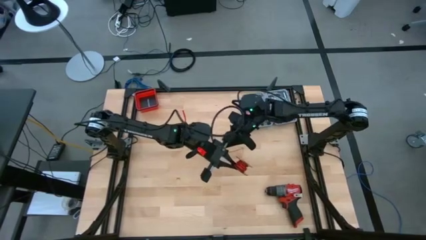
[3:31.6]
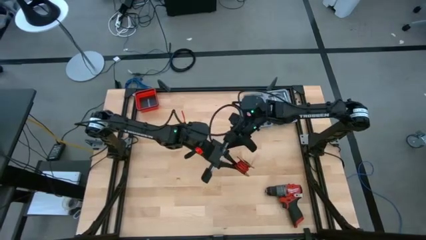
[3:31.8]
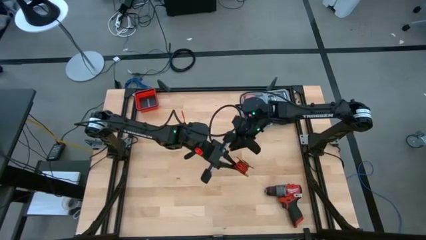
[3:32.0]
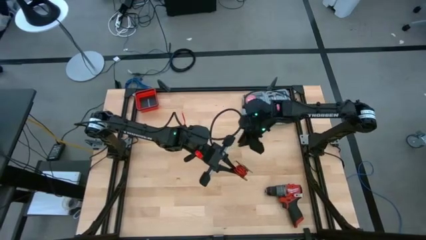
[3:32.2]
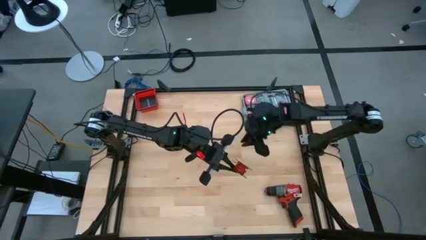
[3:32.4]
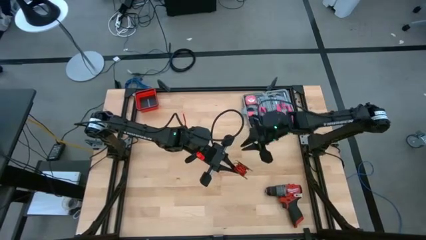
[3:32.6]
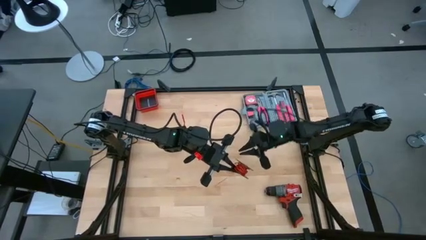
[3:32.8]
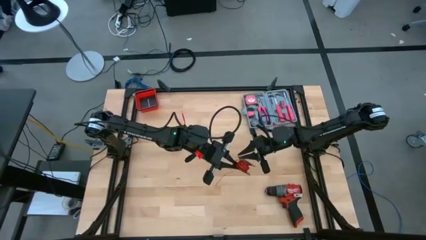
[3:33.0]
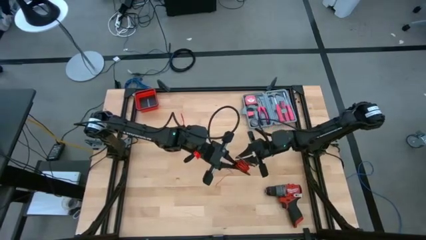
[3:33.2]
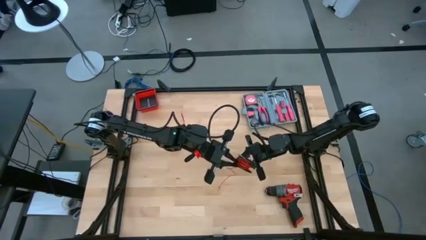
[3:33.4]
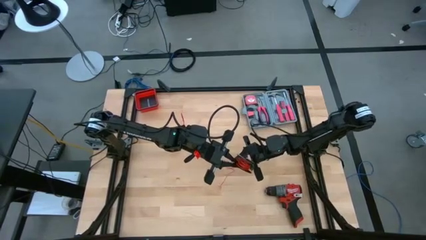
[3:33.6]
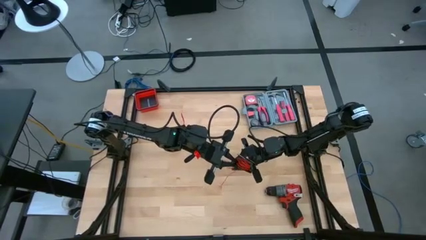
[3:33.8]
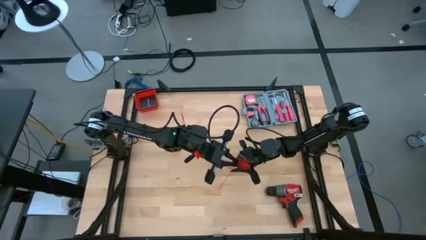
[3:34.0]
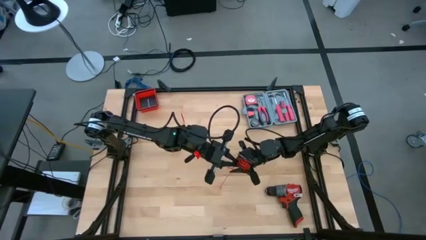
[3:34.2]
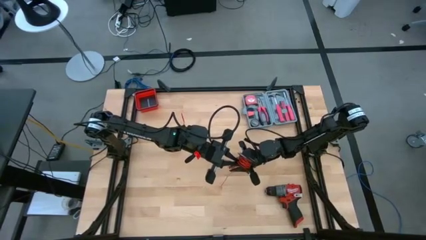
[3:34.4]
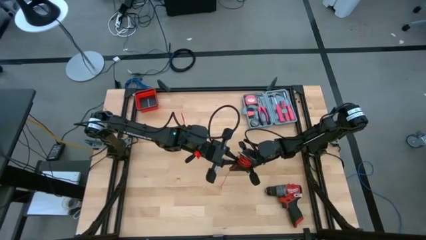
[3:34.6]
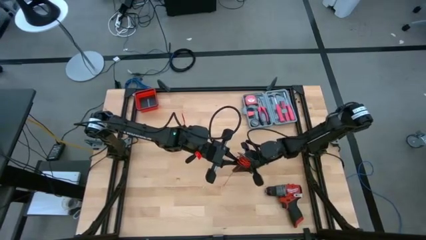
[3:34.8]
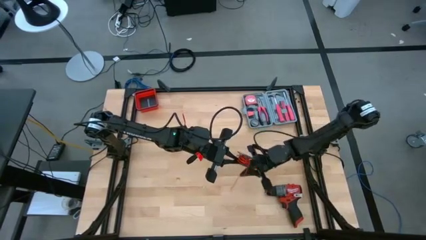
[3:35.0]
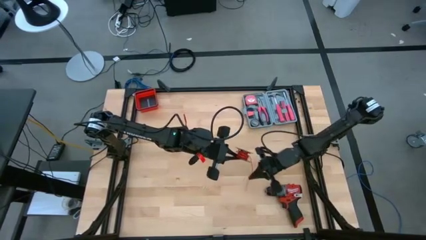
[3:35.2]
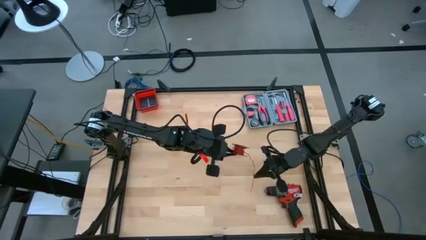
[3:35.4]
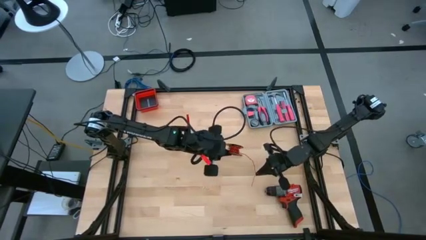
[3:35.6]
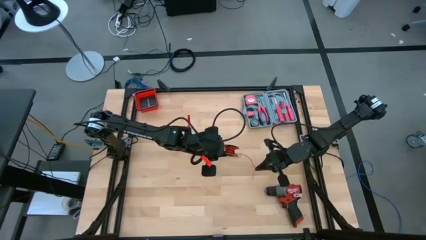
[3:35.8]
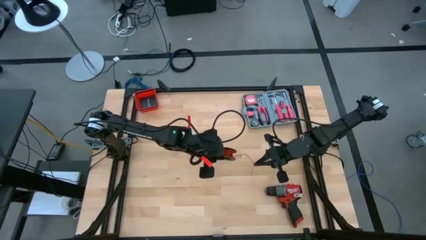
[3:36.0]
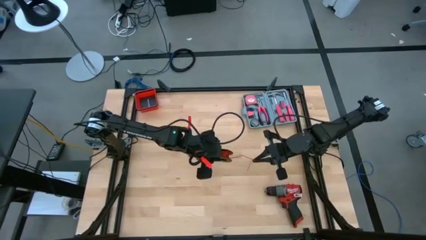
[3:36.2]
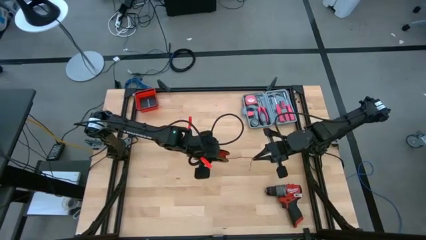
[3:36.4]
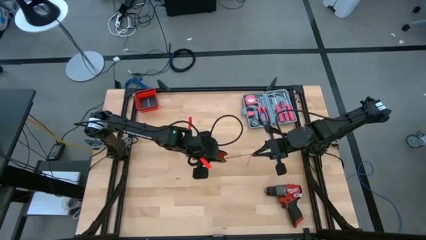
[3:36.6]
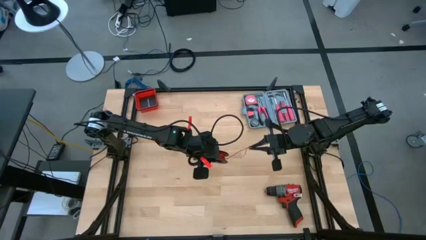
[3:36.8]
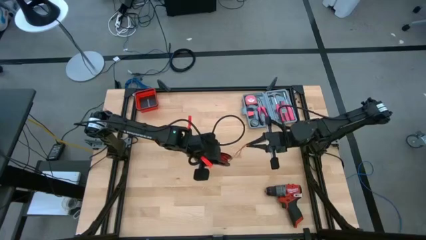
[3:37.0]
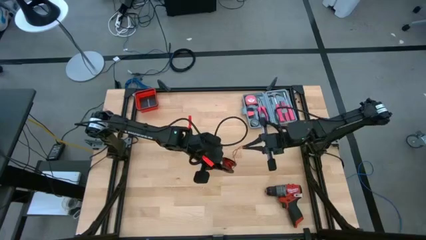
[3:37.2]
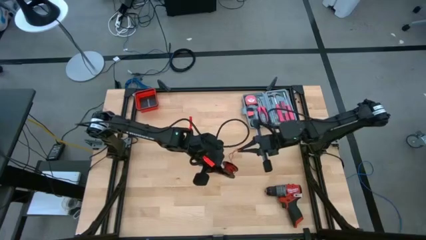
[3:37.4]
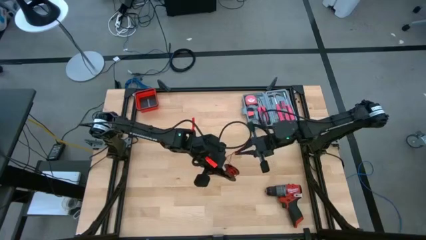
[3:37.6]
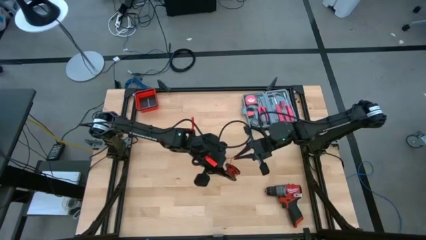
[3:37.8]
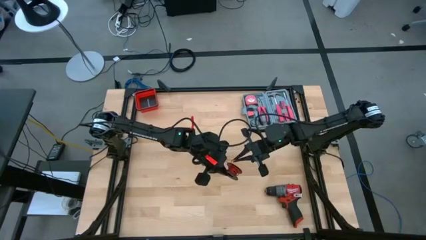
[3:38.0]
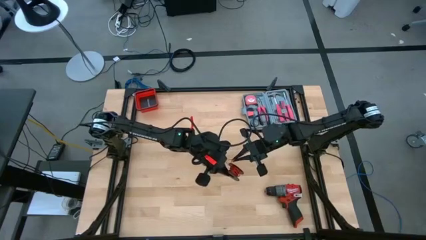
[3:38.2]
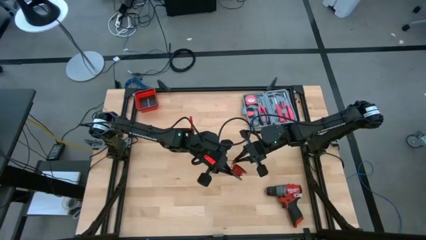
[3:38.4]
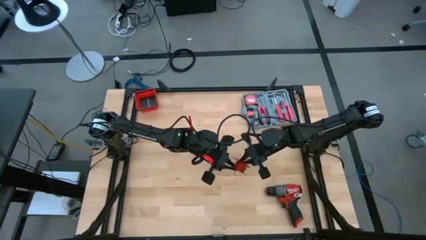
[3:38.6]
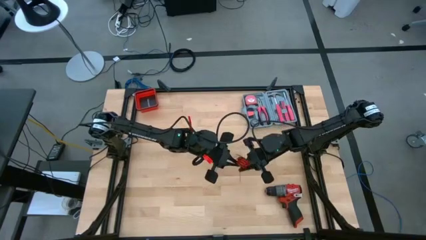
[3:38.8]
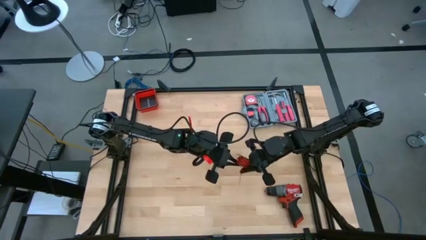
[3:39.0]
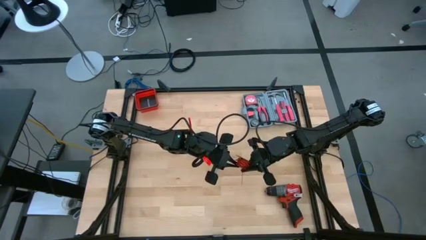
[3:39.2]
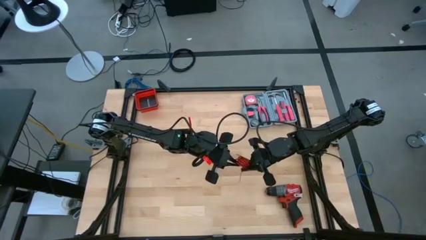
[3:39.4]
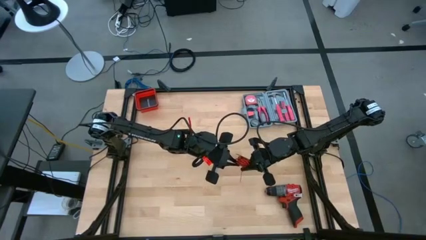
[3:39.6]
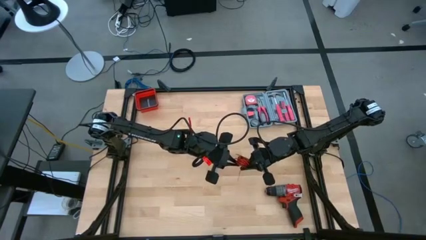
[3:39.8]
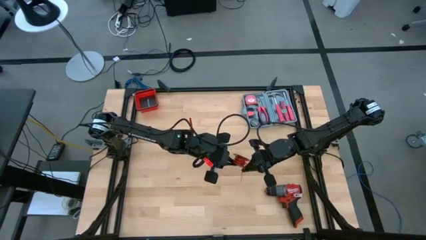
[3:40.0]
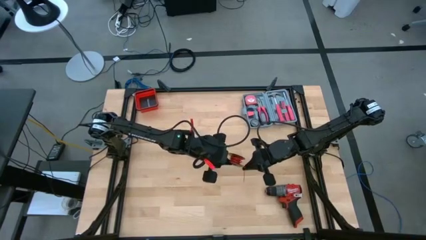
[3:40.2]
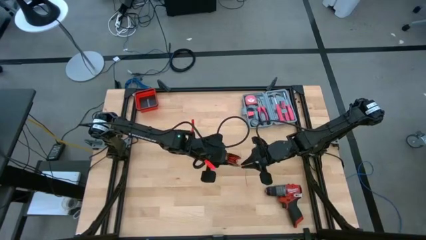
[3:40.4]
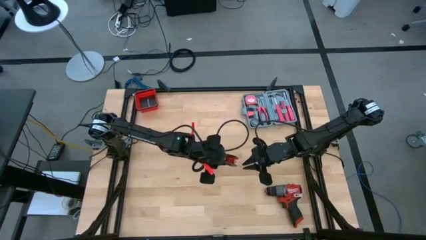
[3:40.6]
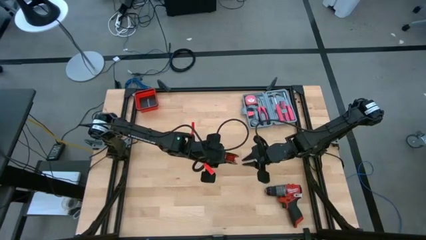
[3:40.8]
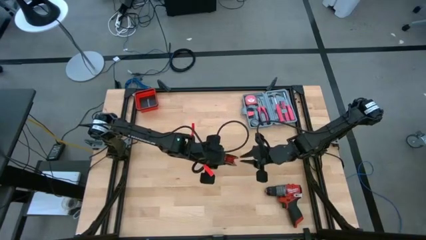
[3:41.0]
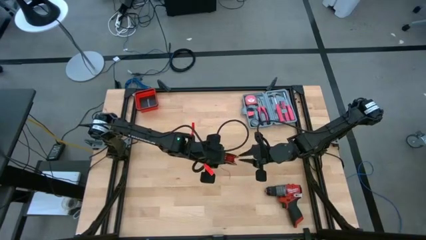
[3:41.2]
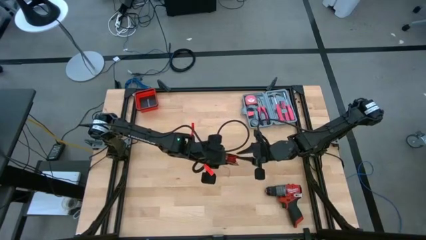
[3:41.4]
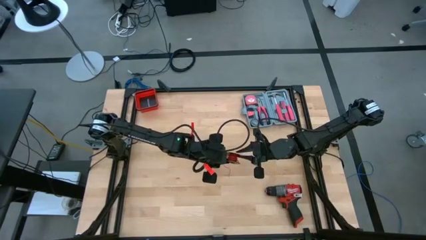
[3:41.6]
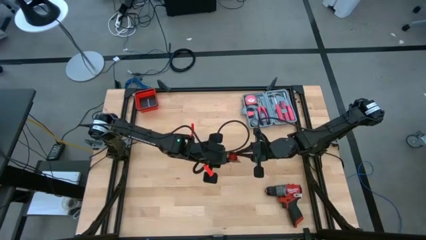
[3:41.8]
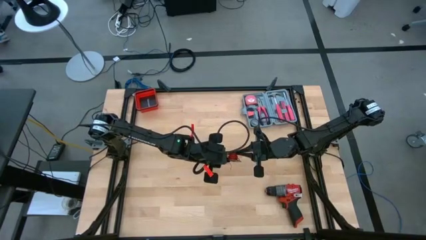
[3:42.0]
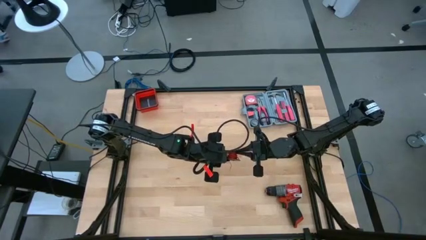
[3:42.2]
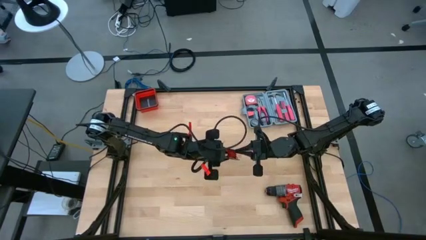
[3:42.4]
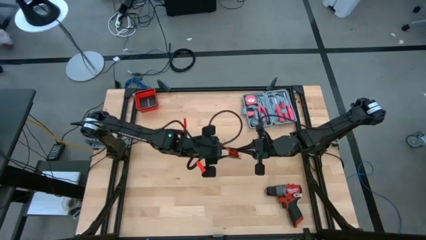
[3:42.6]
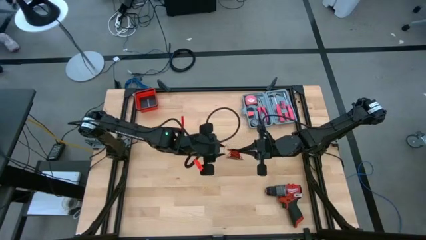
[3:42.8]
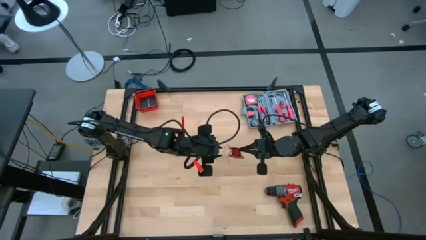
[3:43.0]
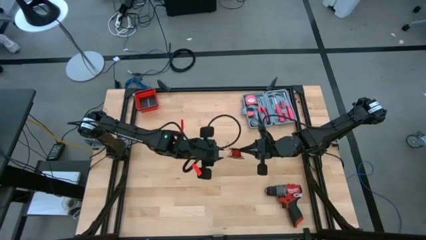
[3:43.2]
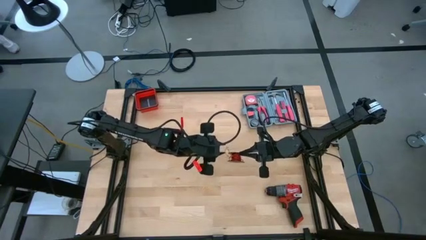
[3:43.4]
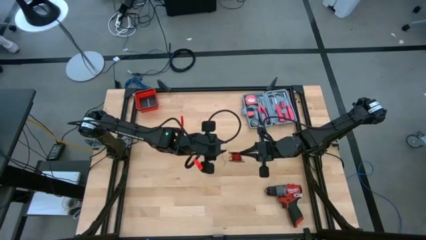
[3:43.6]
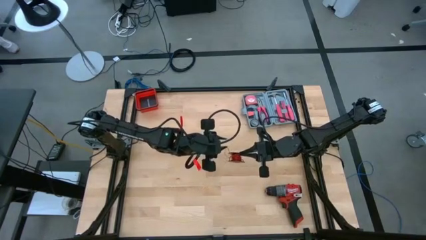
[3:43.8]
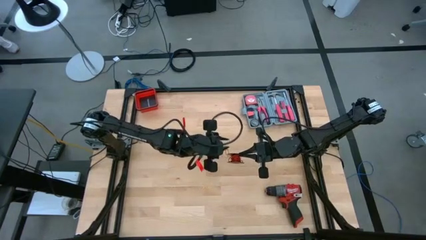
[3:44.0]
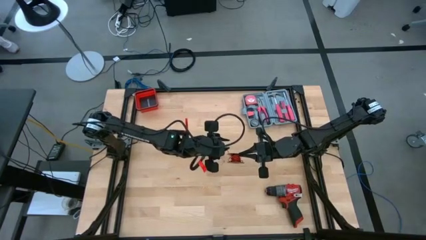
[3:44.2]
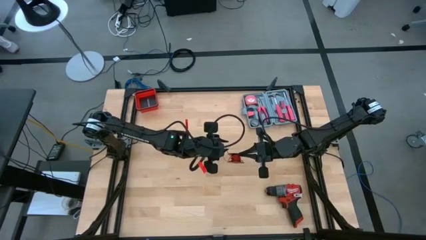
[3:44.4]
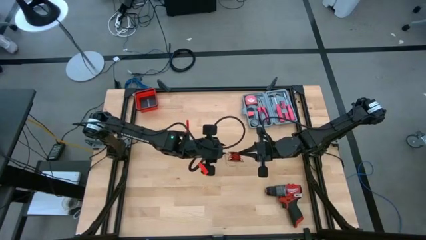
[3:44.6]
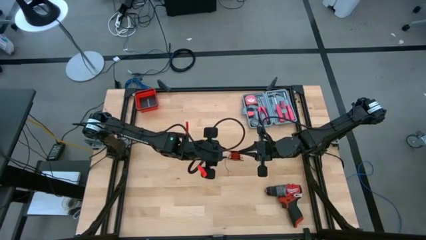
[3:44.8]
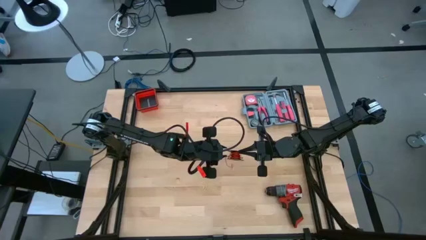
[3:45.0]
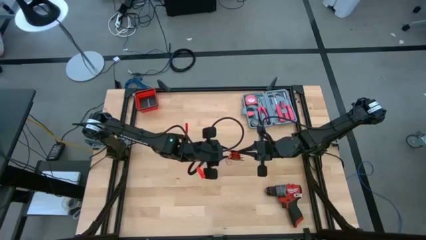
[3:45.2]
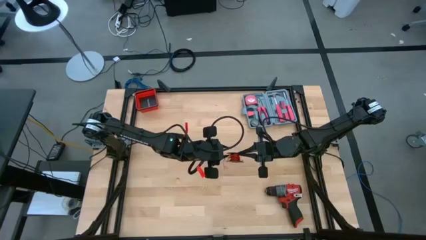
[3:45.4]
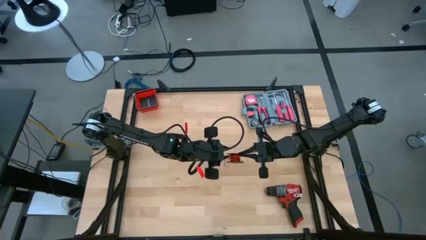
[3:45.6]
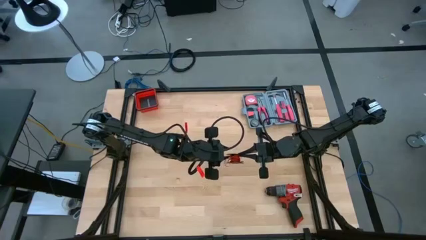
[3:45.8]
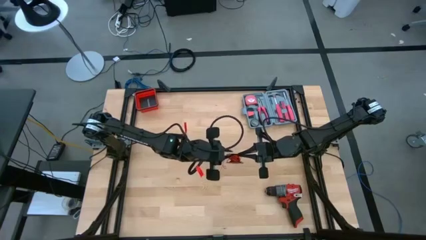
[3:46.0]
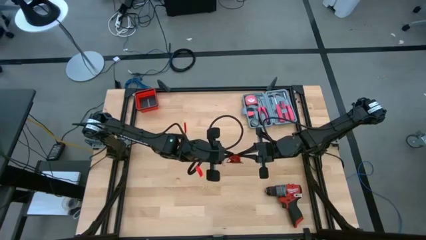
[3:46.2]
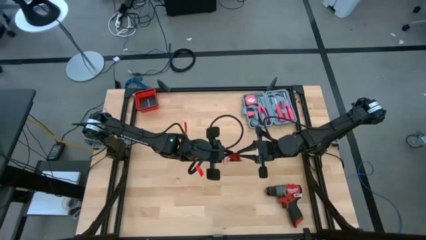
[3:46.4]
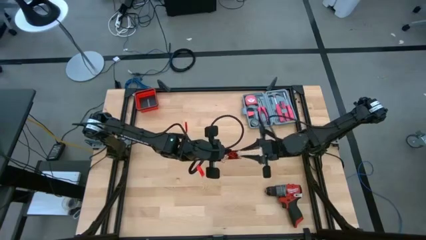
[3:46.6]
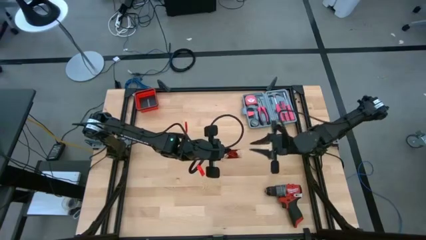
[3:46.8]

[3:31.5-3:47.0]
Task: Coil cords
Coil the red wire onto the black spool

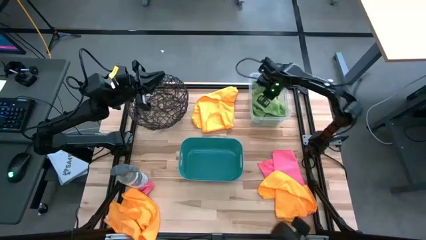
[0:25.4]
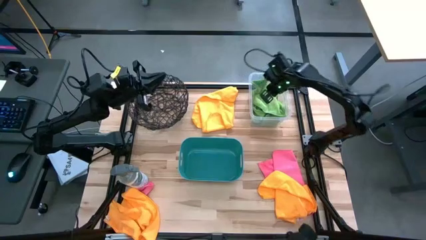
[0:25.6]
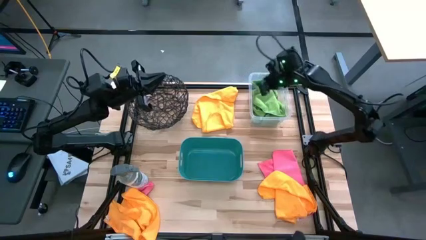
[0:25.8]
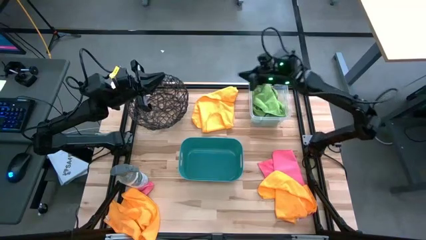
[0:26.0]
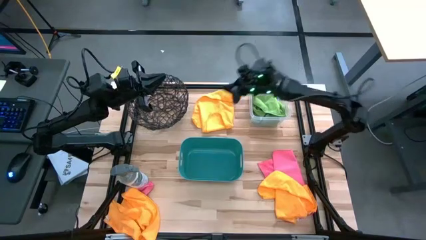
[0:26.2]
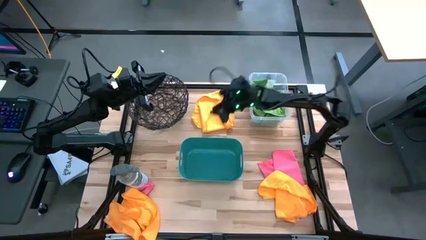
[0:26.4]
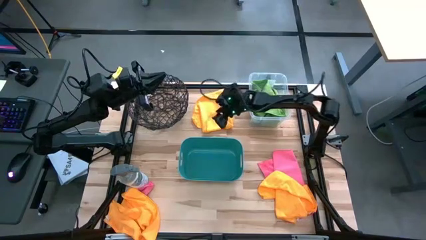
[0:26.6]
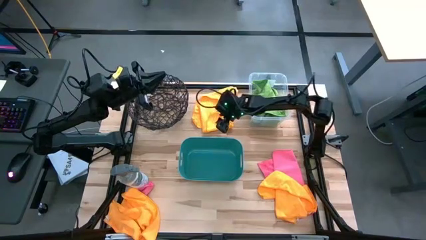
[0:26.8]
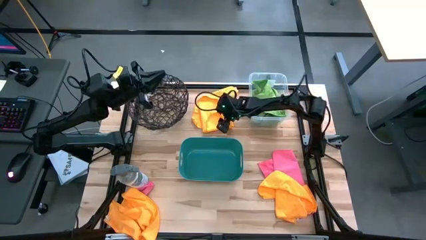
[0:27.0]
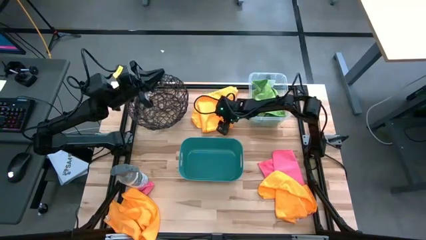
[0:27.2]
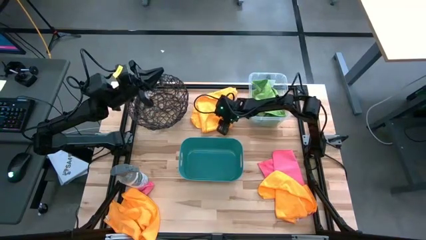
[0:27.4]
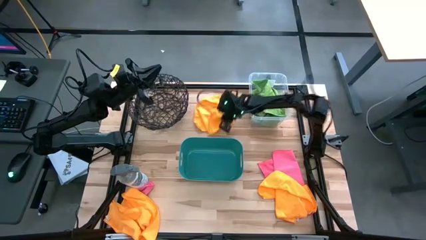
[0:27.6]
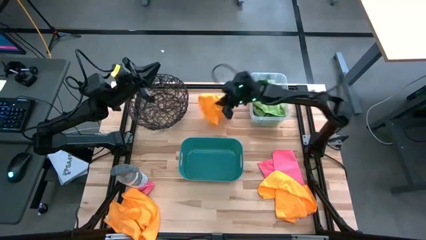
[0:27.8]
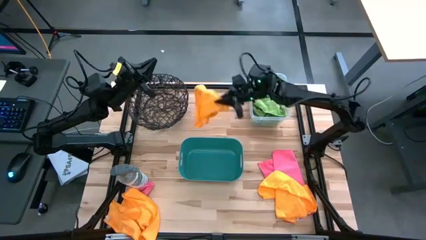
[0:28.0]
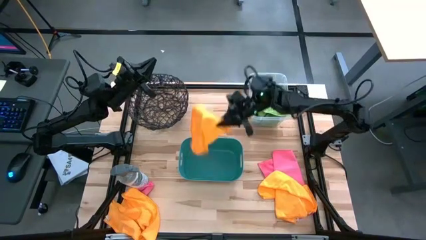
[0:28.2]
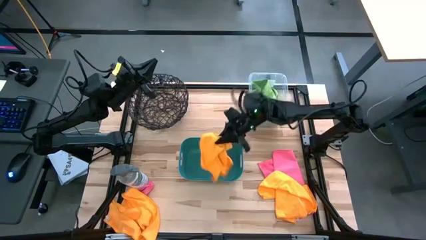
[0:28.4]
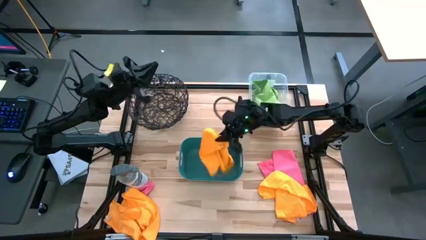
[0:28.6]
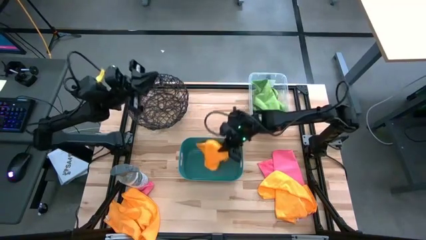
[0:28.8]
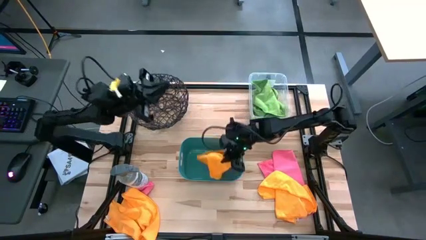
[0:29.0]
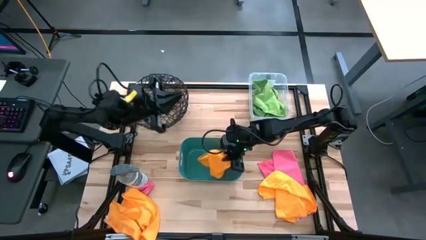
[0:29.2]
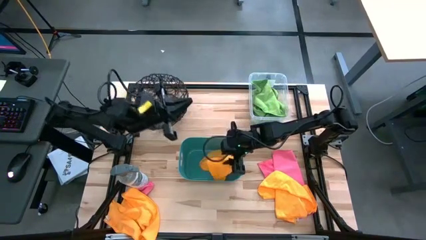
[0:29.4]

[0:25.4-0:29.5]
Task: Sort microfiber towel by color & place in baskets
Put the top yellow microfiber cloth into the blue bin
